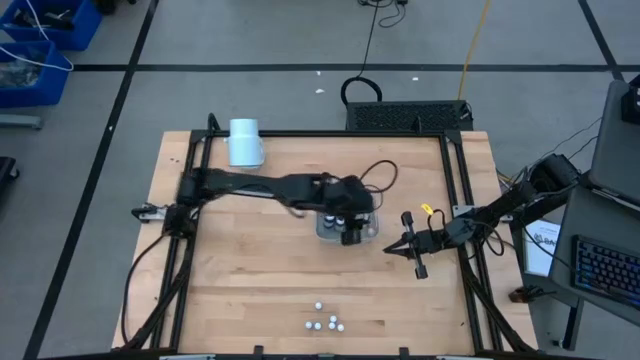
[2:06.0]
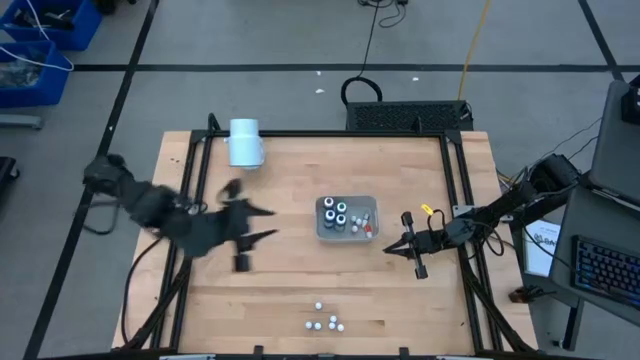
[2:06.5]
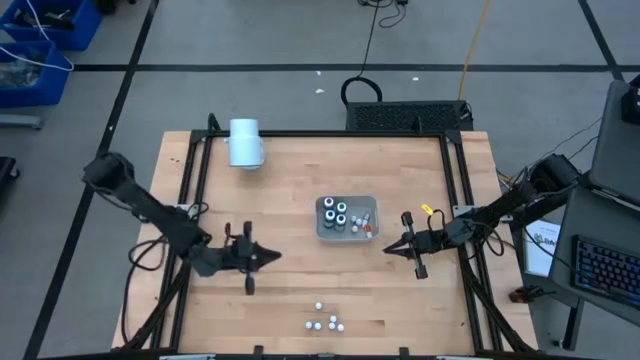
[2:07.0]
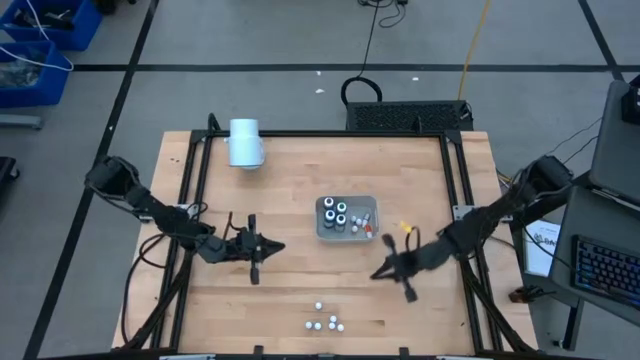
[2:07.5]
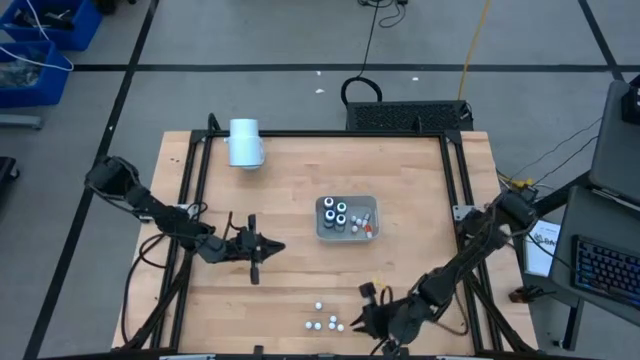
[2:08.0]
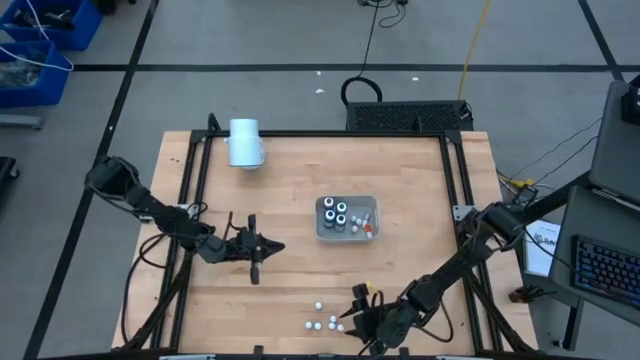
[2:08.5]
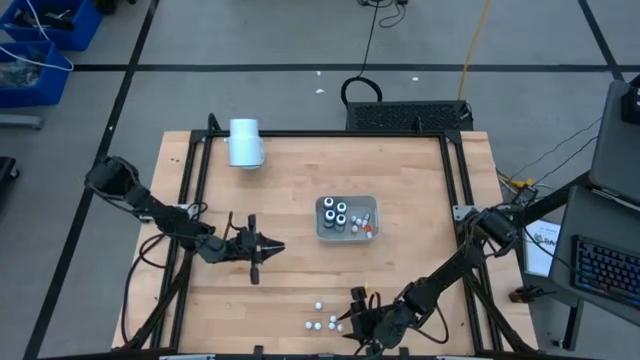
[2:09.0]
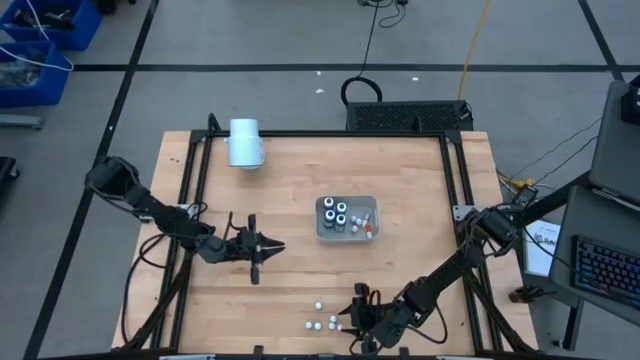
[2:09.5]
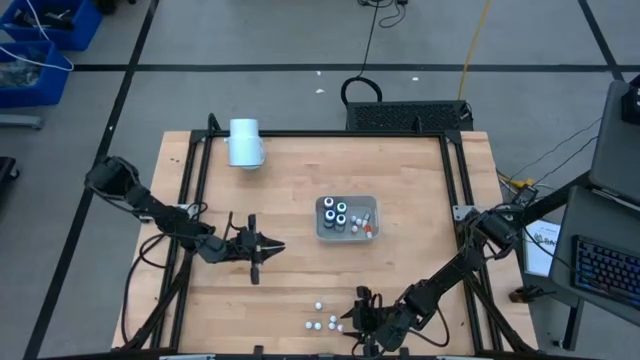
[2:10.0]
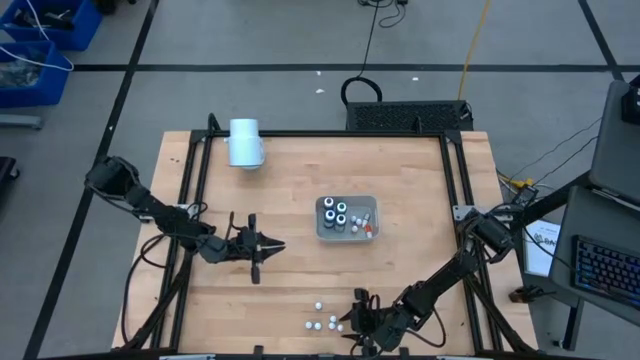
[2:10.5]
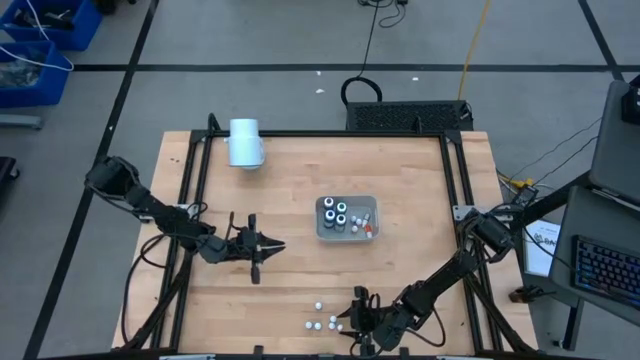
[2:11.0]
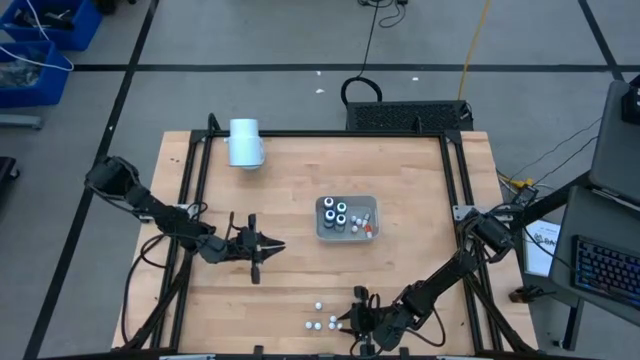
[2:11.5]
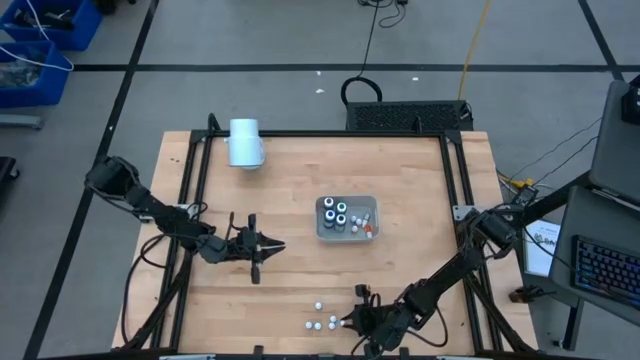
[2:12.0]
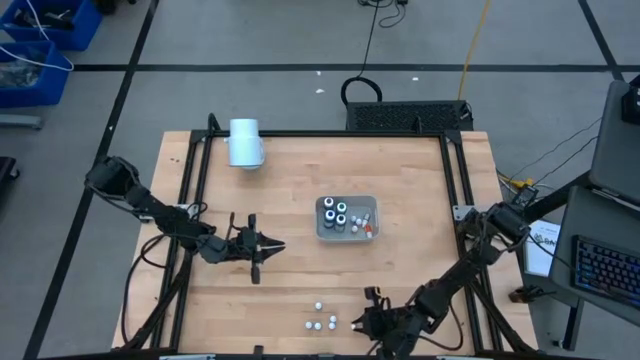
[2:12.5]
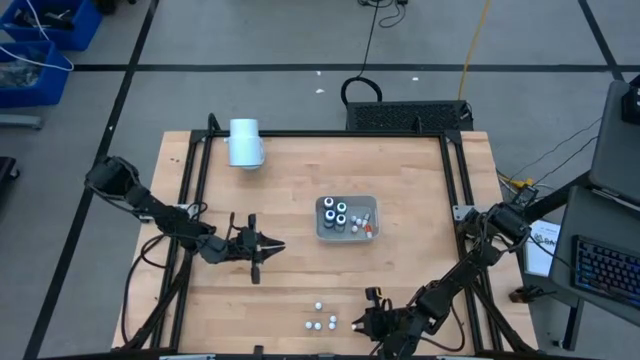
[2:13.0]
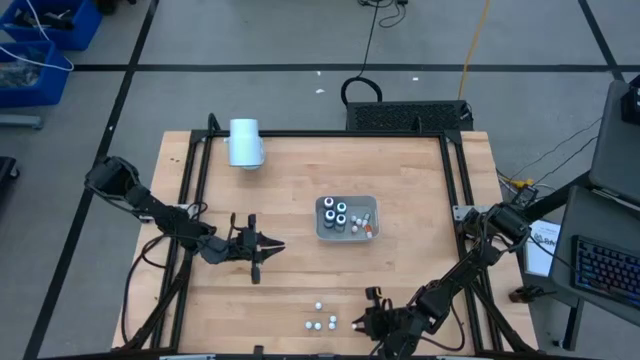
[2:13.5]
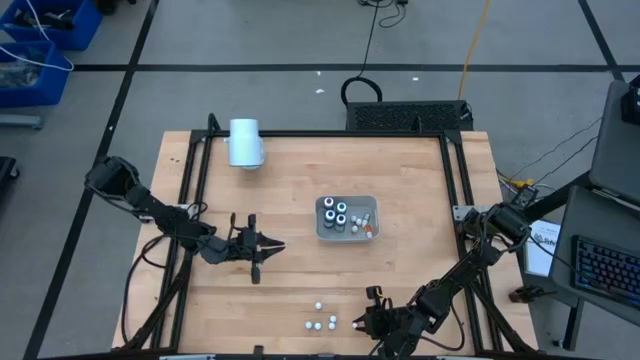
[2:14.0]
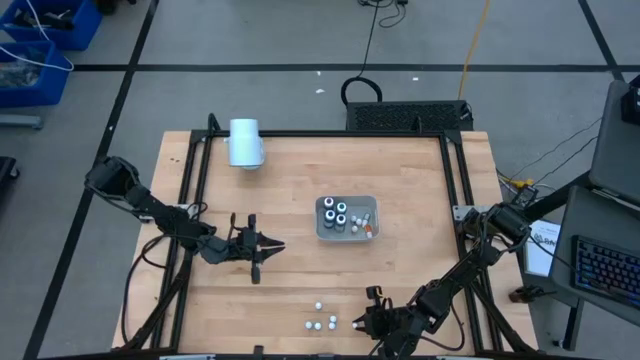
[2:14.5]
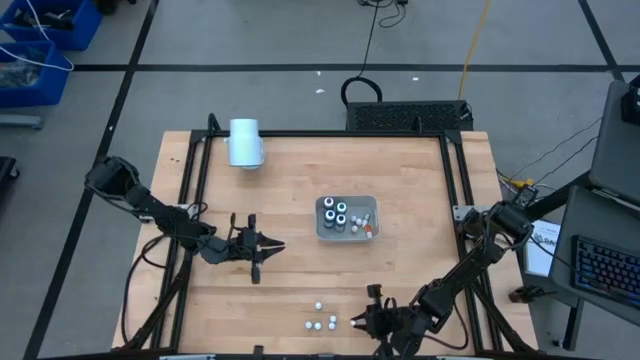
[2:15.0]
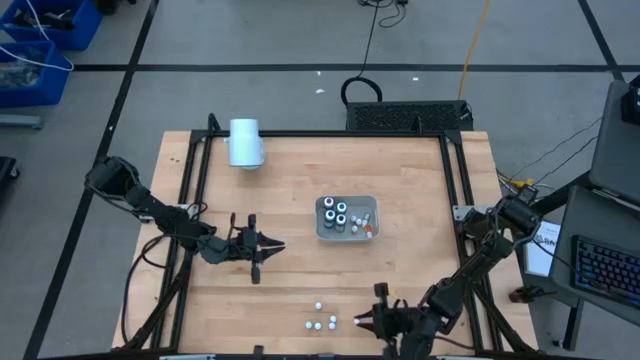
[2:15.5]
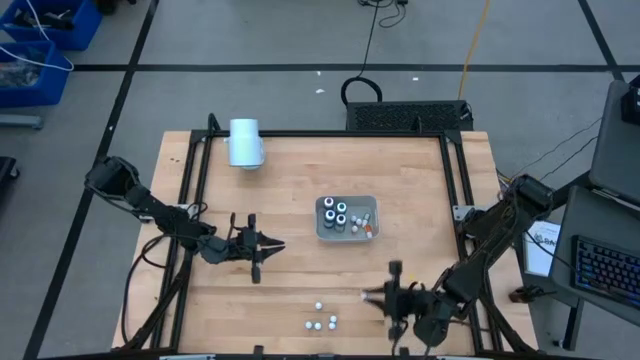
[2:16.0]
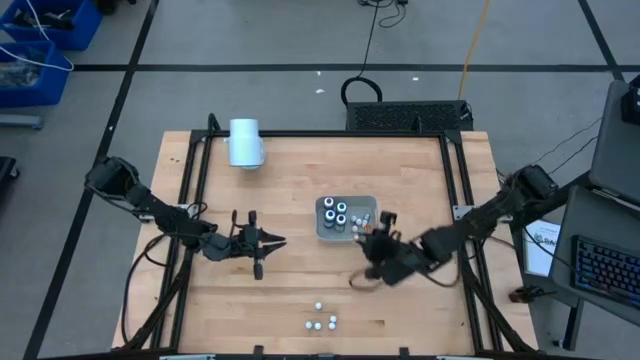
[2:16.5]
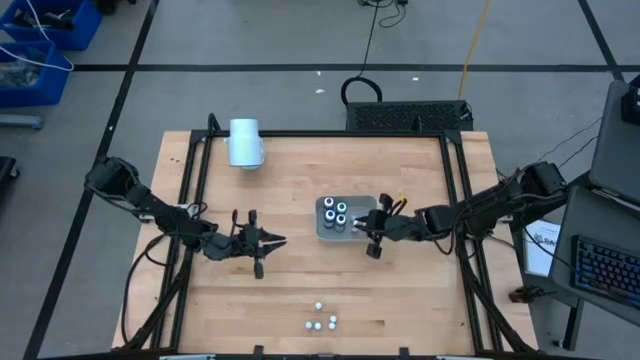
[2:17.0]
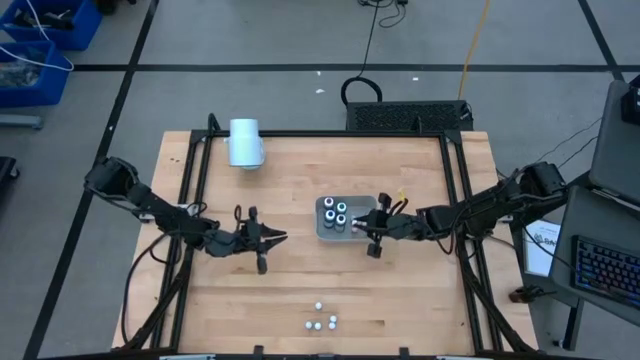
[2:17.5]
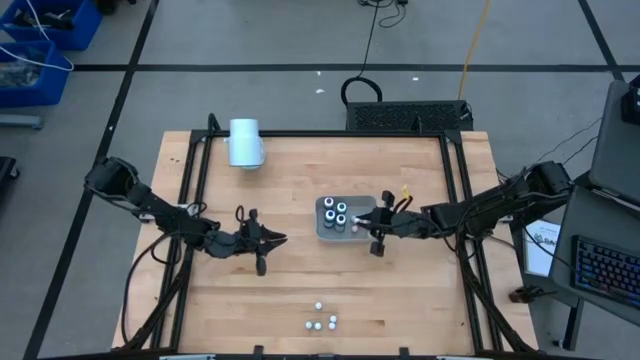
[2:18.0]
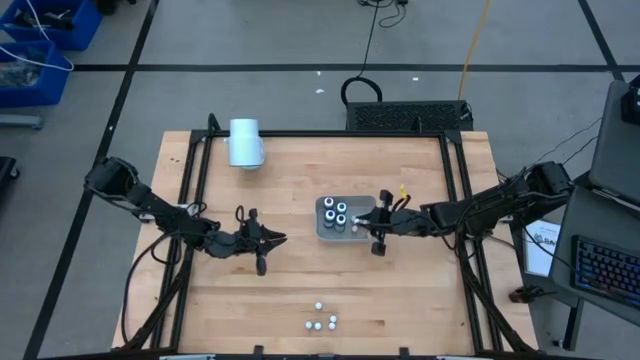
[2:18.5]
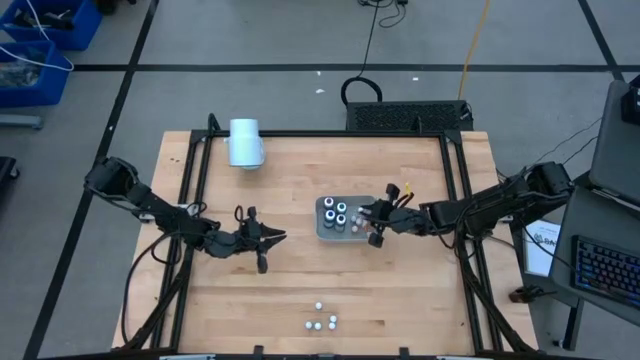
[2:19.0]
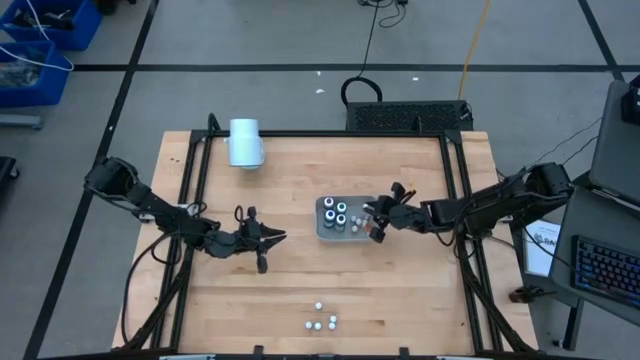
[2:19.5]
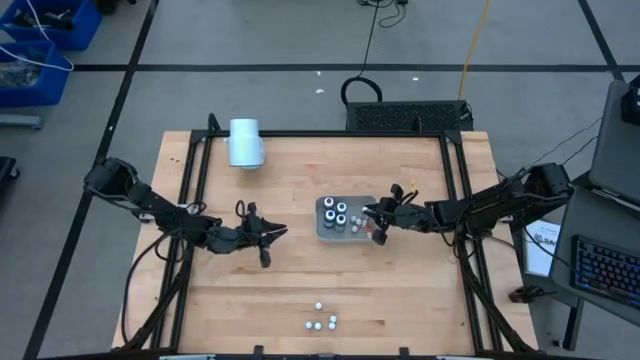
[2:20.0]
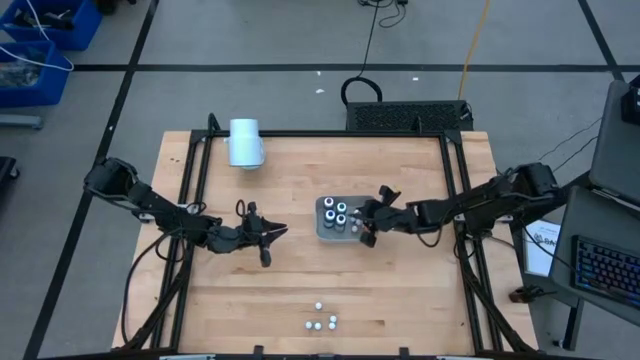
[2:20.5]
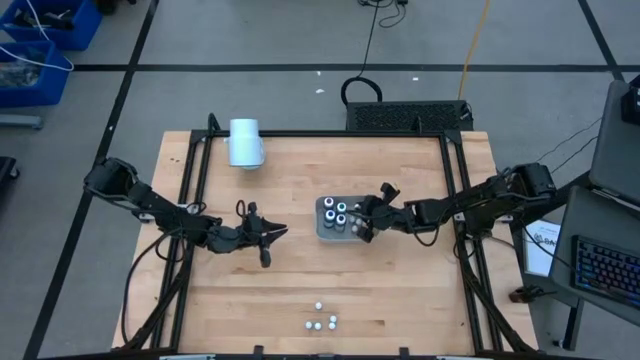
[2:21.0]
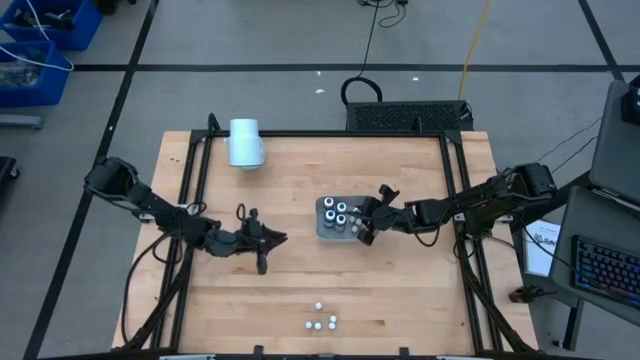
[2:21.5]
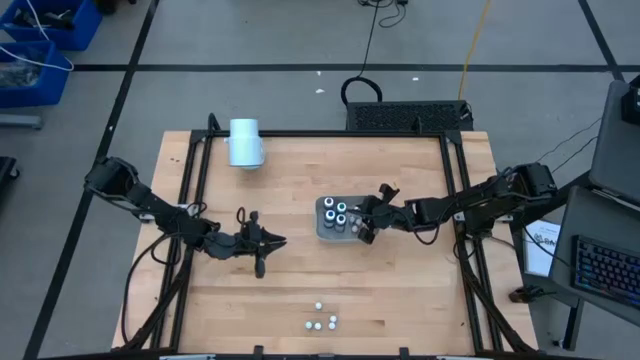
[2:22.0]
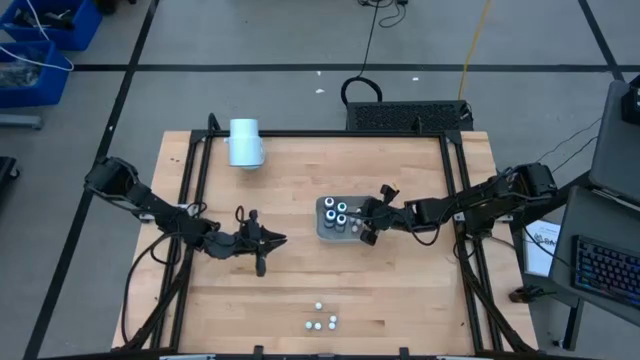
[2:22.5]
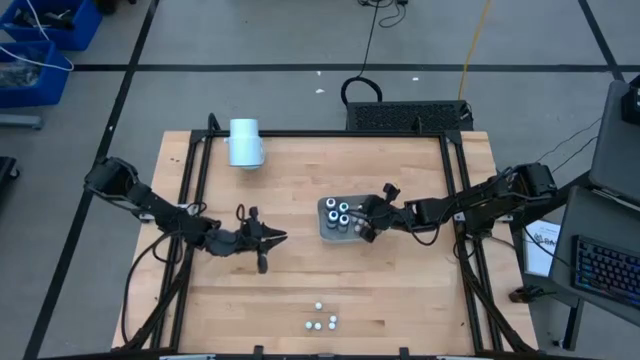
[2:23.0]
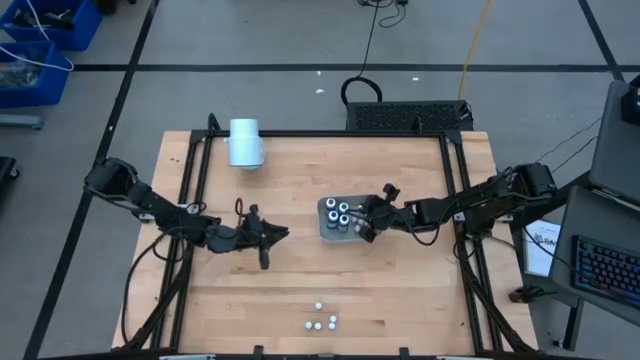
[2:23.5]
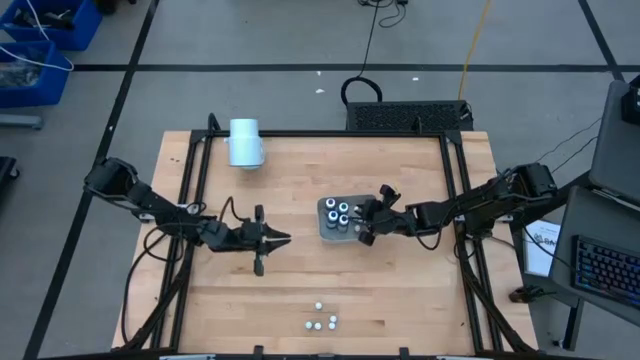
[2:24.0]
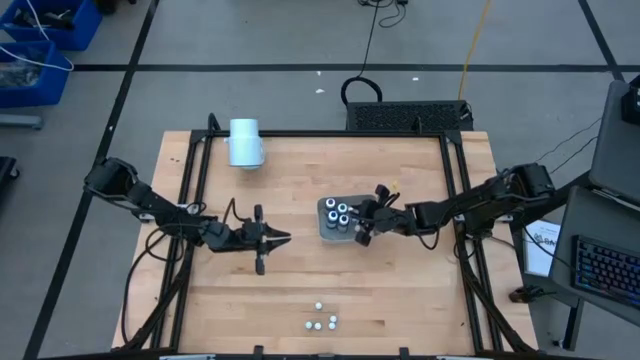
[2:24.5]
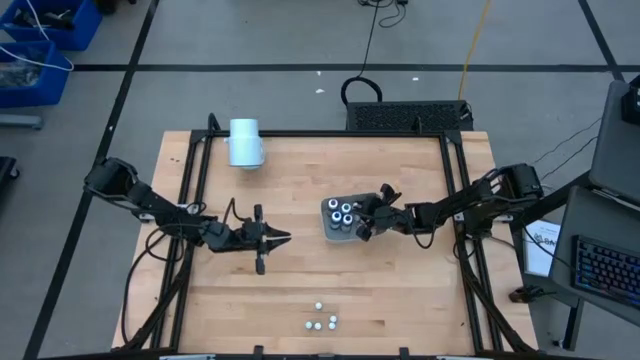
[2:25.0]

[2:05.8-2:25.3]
Task: Pick & Place food coloring
Put the small orange food coloring bottle into the gray bin

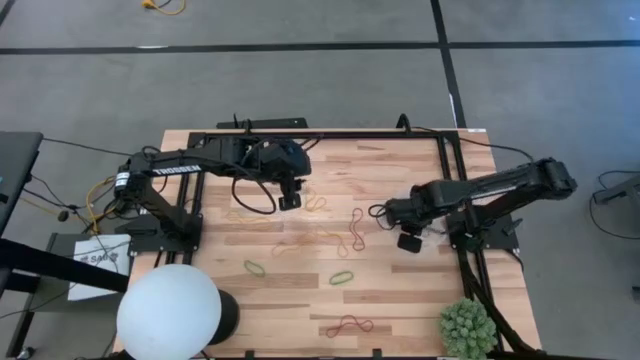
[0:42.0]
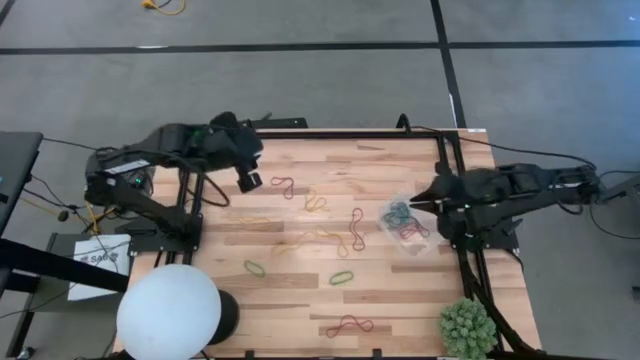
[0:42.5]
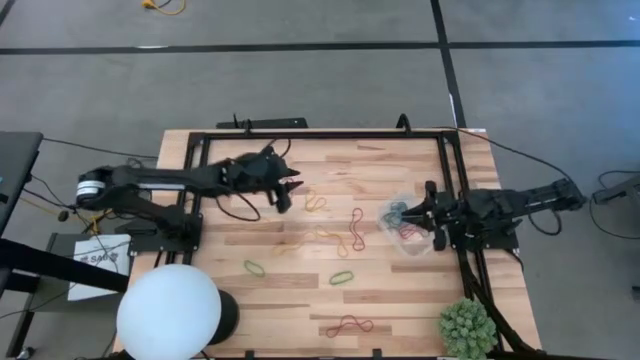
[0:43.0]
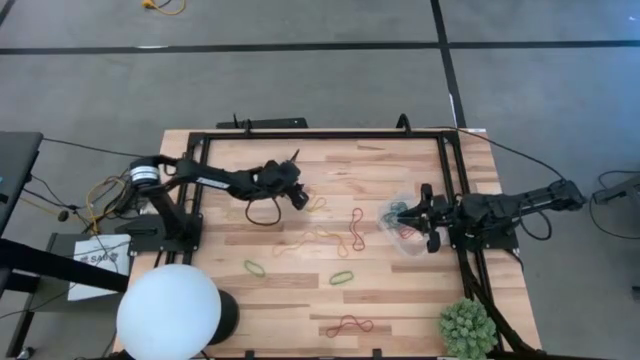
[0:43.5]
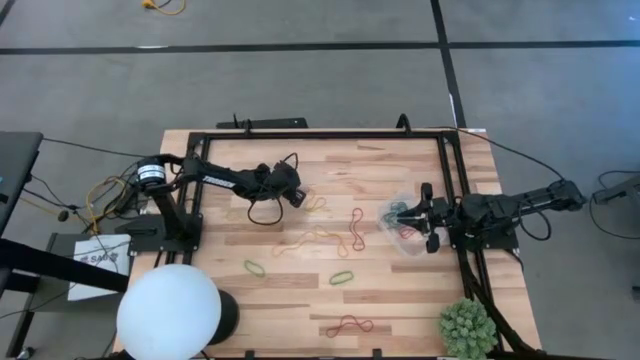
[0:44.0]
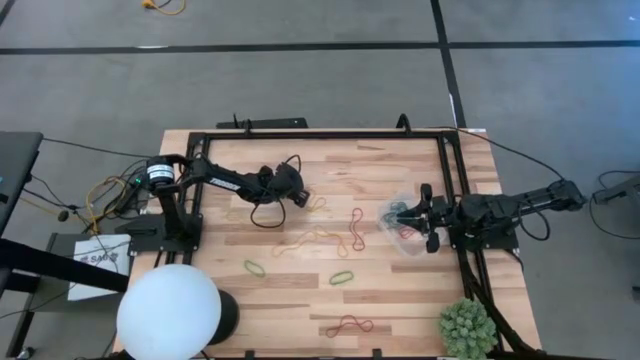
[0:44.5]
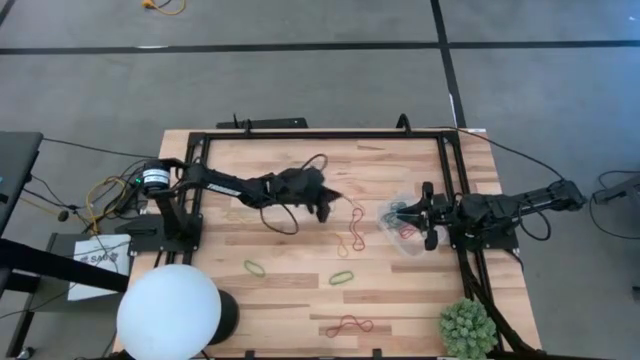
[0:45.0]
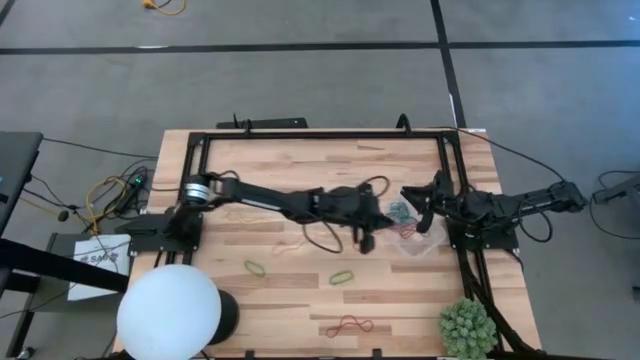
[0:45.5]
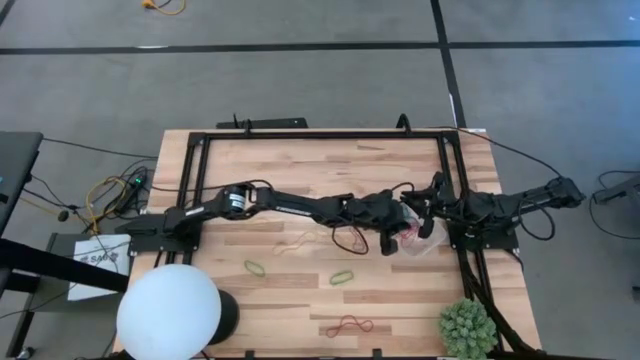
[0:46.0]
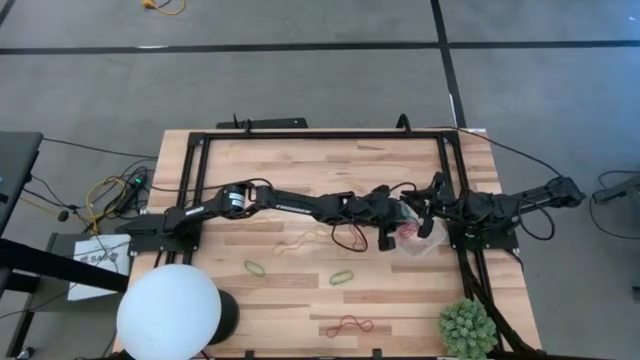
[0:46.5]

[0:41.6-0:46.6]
Task: Pick and place items into bin
Put the red rubber band into the transparent bin
